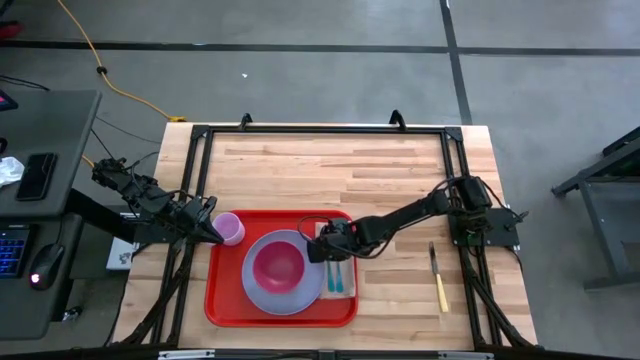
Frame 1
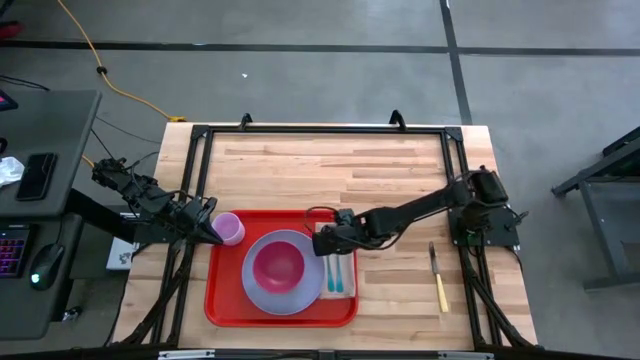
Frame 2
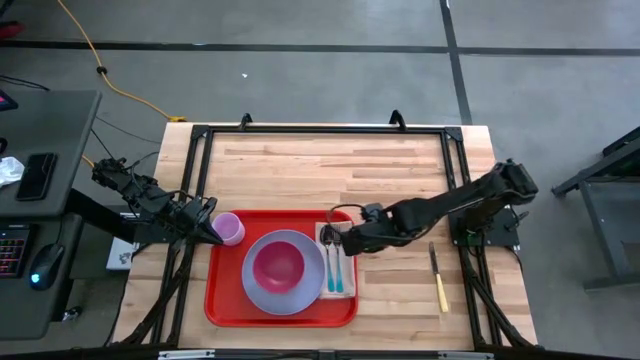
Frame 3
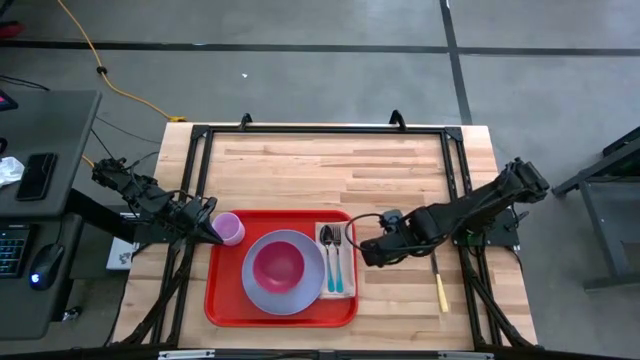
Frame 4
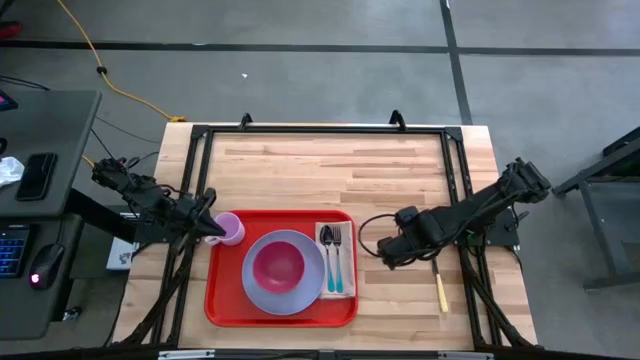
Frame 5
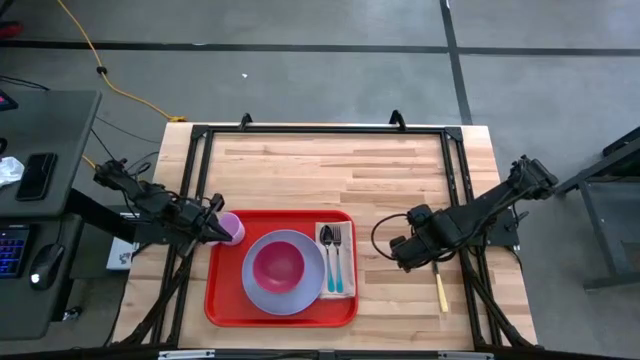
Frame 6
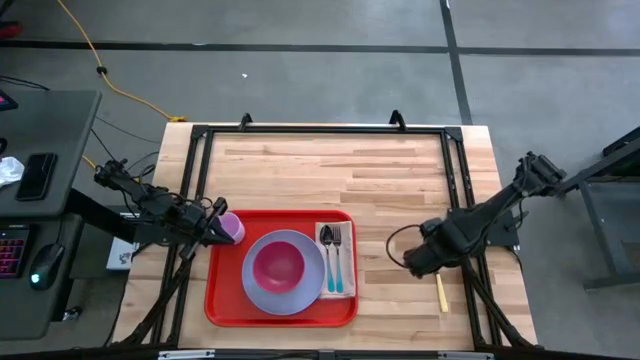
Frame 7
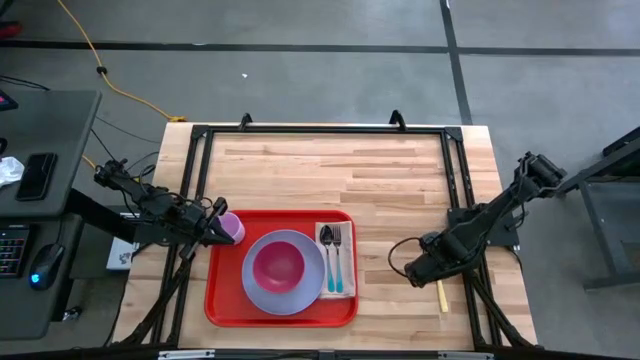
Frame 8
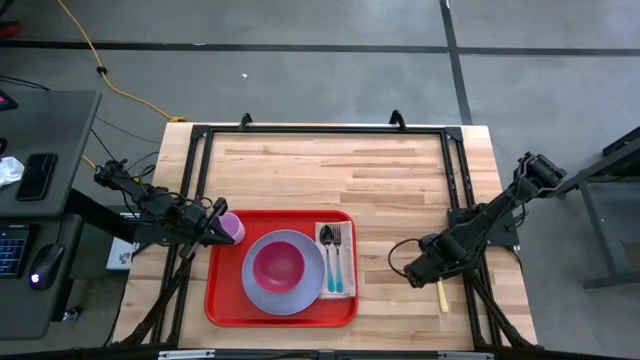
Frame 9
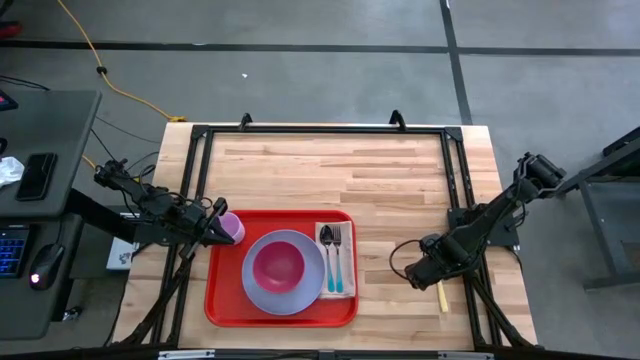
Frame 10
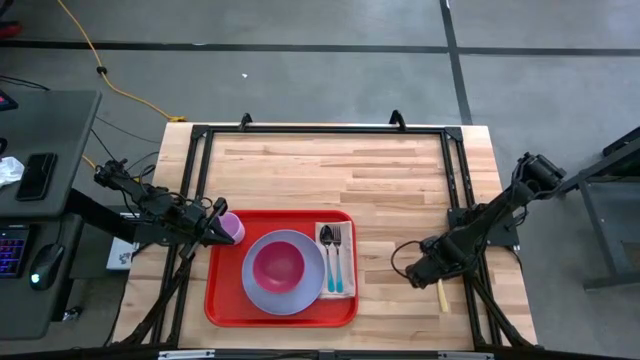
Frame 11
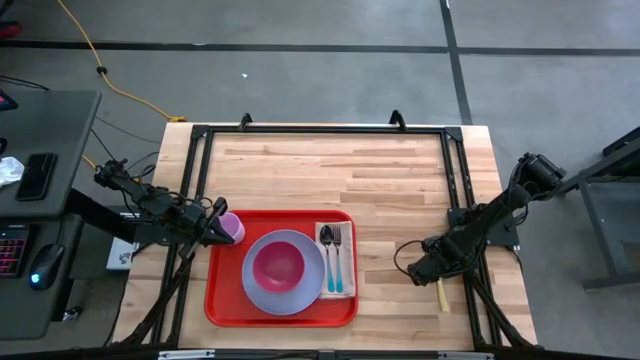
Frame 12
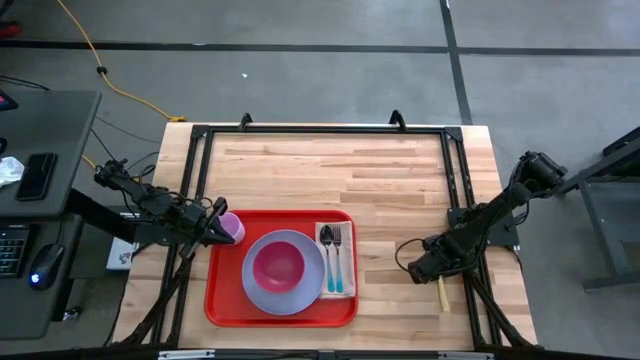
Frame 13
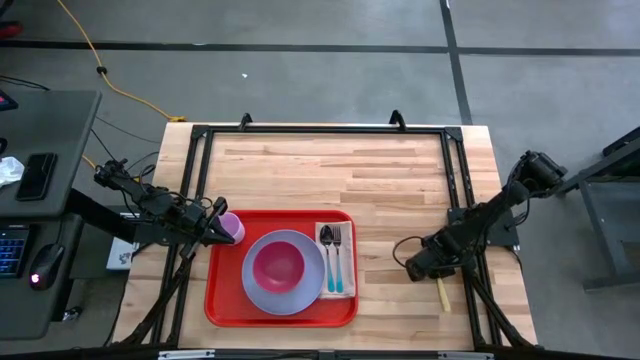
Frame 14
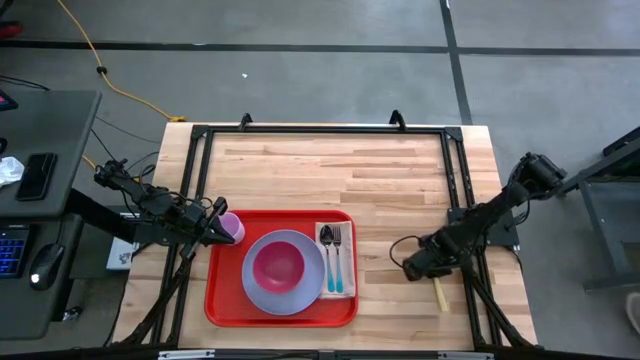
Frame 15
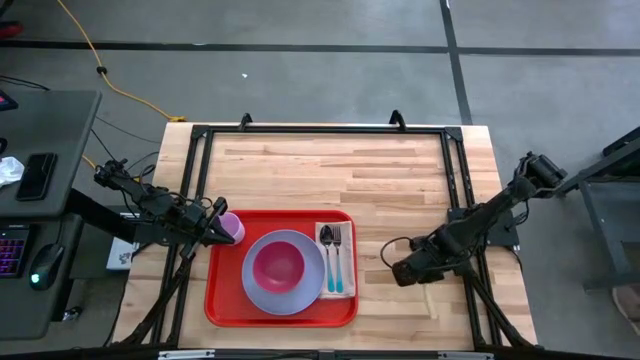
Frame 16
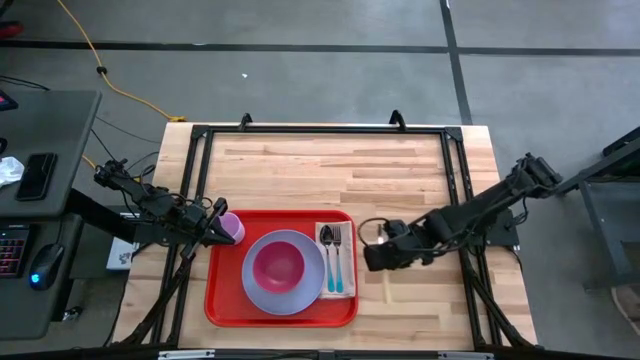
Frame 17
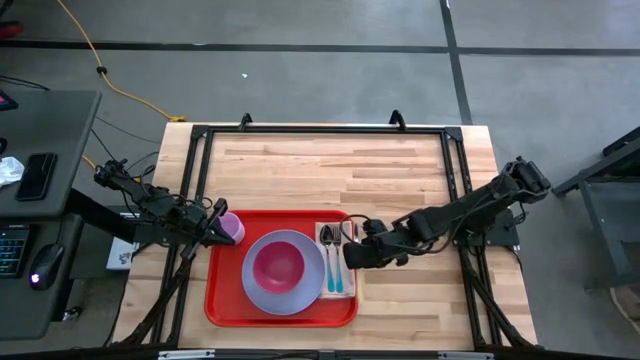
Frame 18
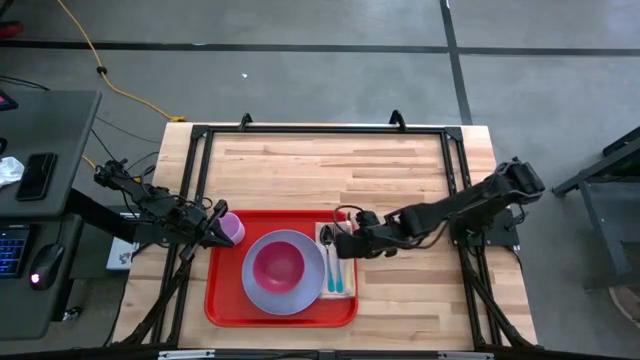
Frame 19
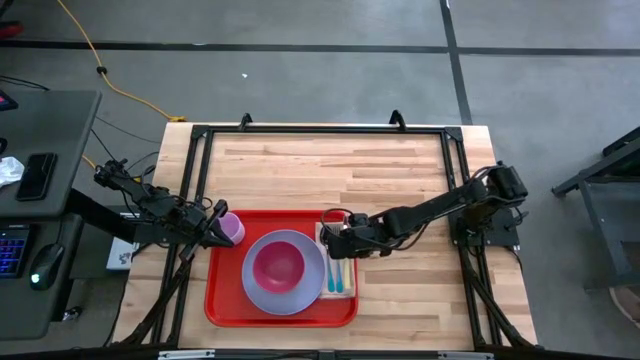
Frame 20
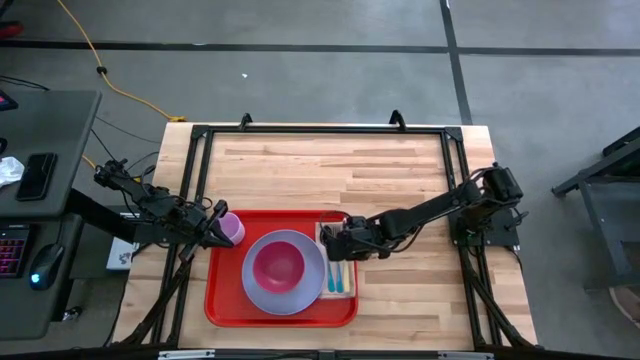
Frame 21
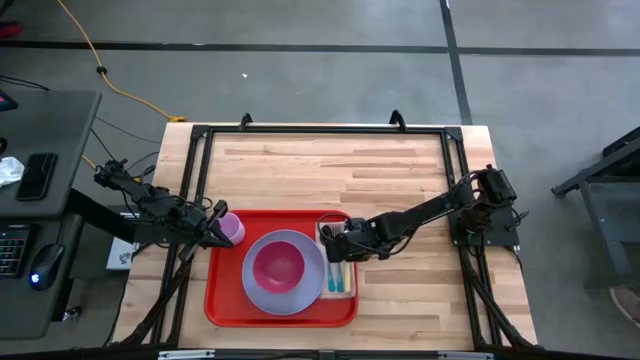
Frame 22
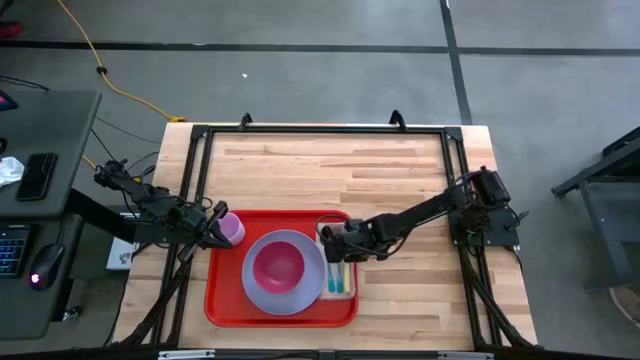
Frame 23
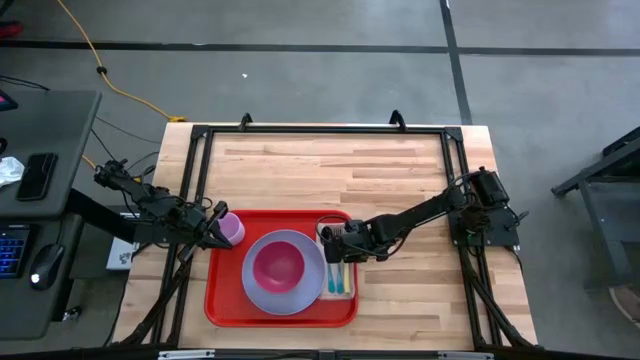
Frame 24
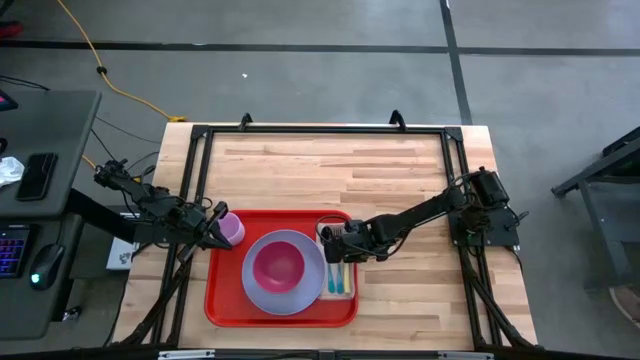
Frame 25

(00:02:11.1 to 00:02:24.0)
Task: Set up tray
Put the yellow table knife to the right of the blue fork on the red tray

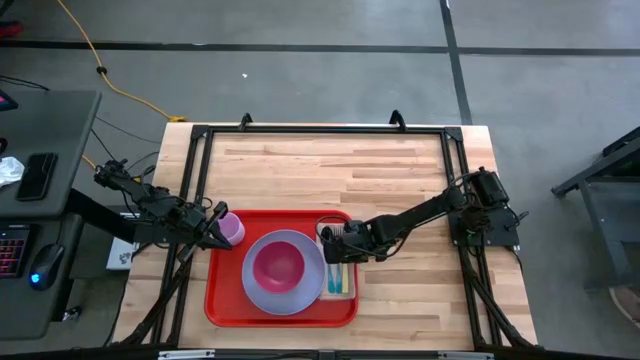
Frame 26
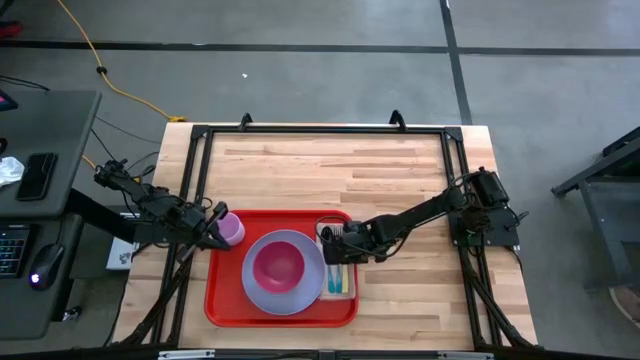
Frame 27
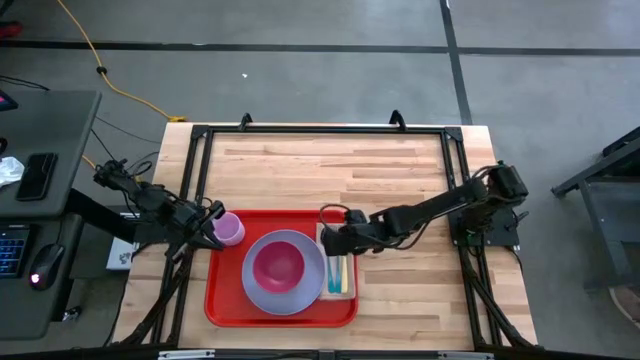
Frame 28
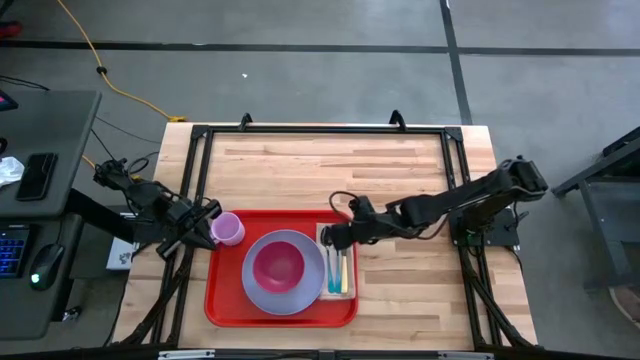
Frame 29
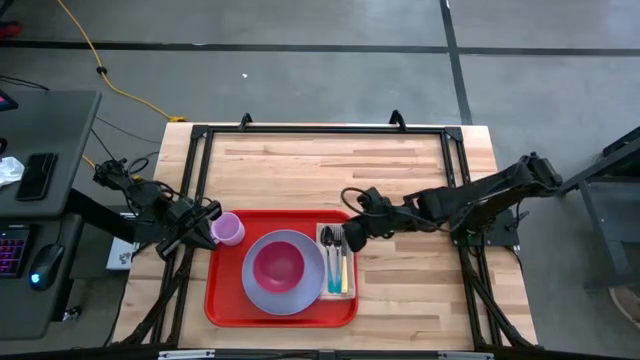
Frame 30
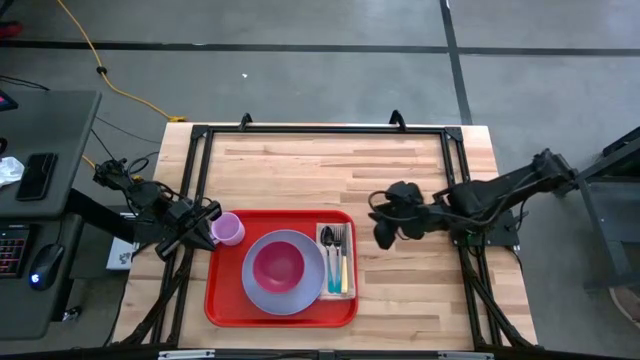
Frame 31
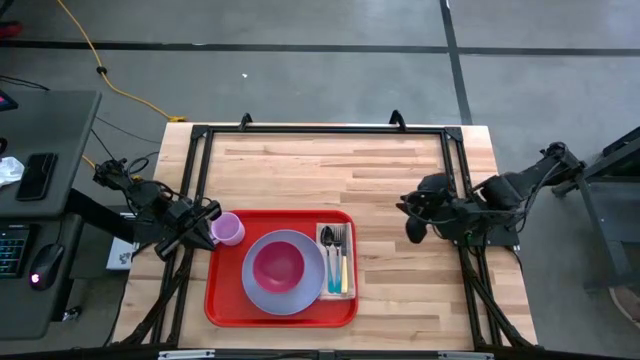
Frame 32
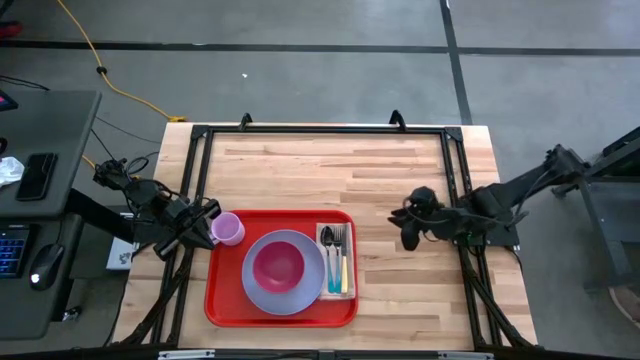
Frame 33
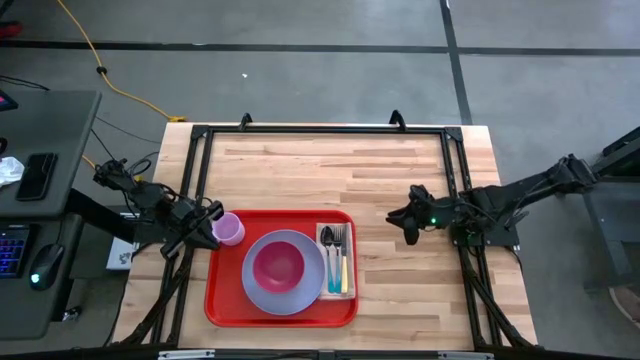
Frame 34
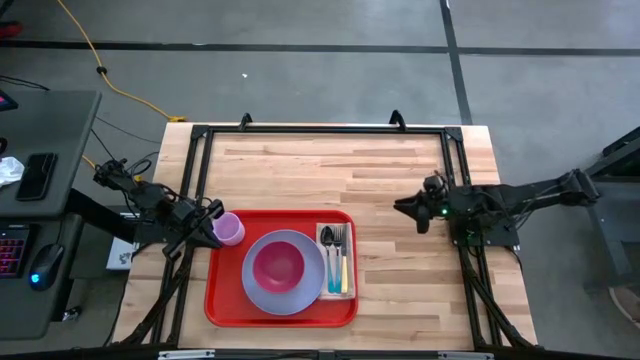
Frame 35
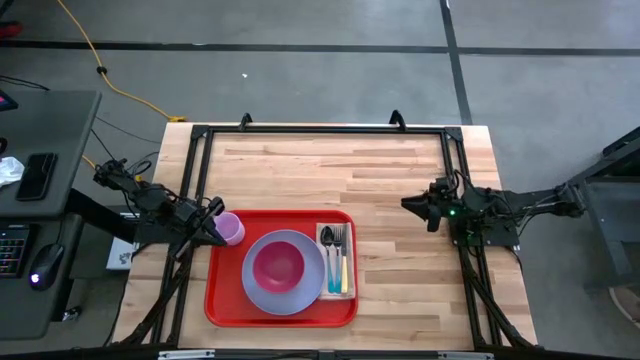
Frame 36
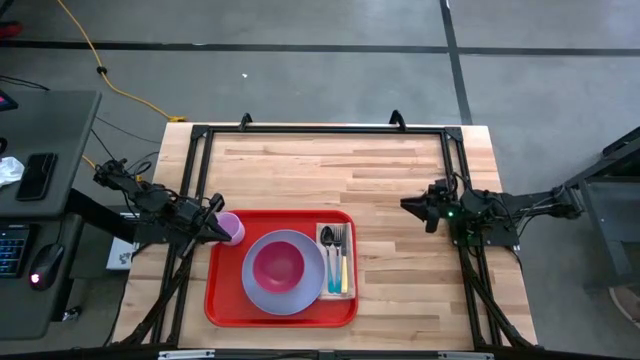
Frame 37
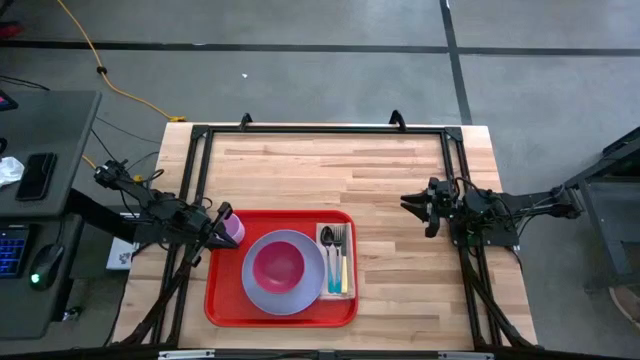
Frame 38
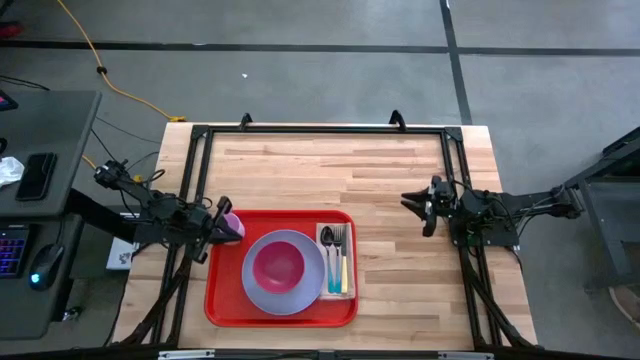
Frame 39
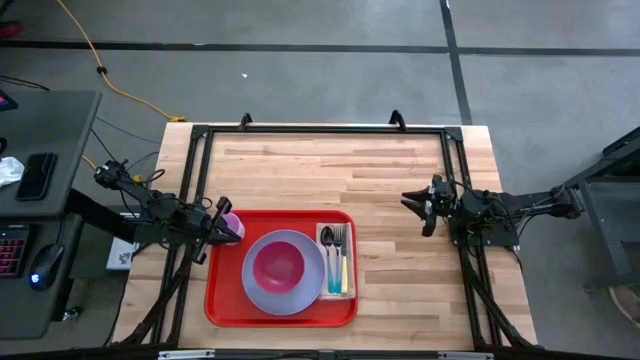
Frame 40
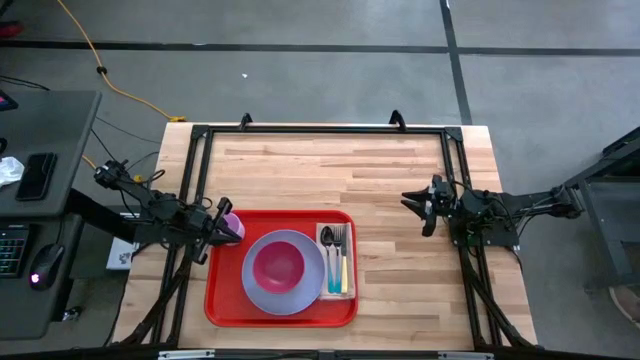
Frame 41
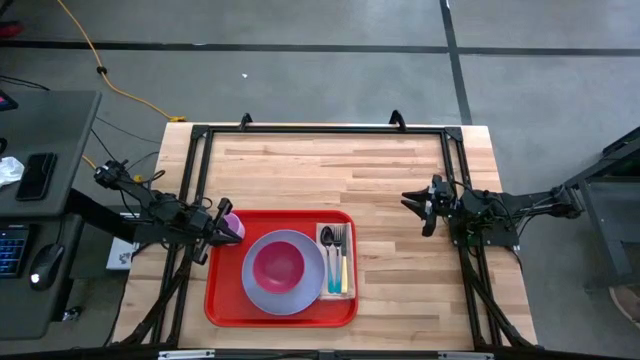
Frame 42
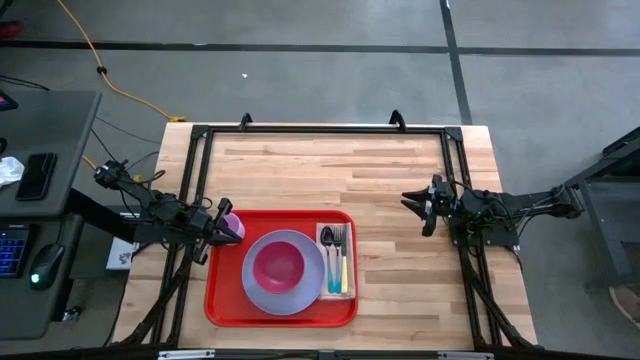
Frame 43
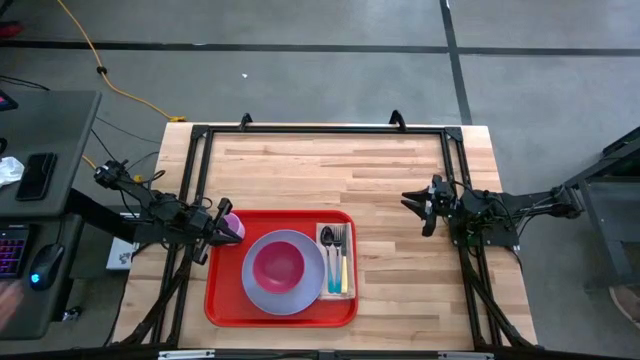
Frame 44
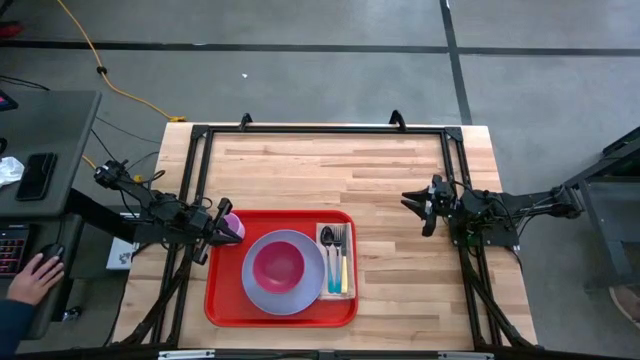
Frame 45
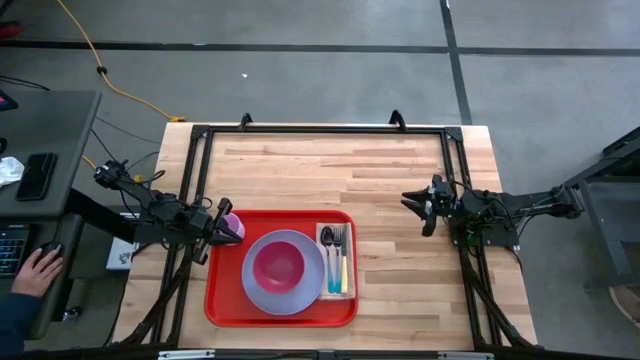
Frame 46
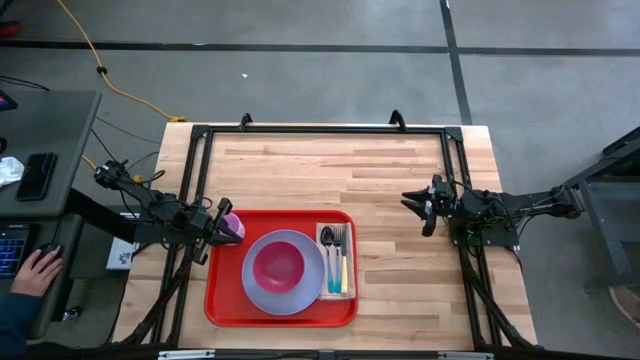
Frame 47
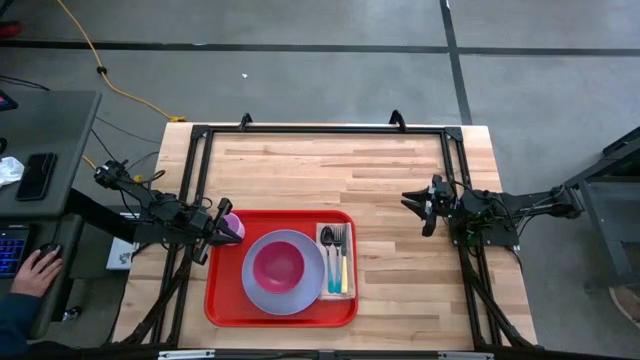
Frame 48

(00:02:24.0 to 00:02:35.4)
Return to Home Position
